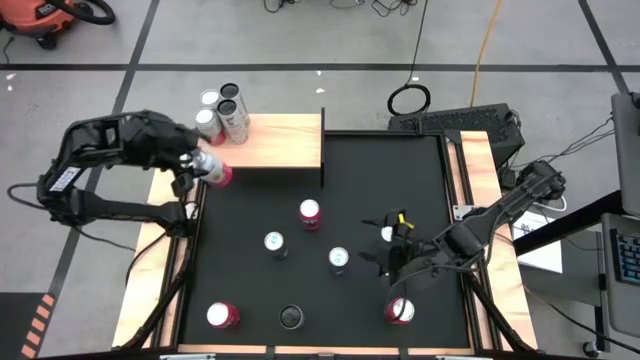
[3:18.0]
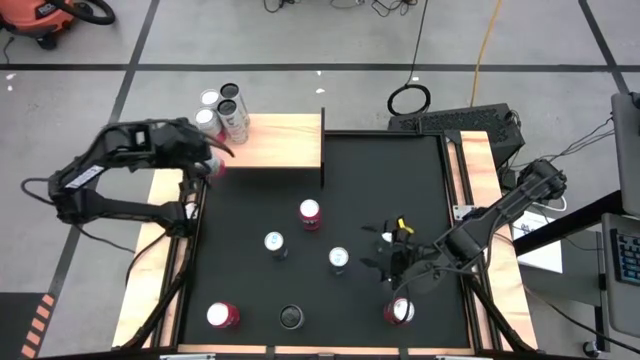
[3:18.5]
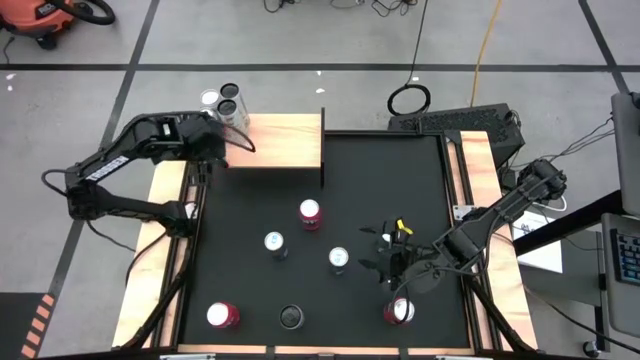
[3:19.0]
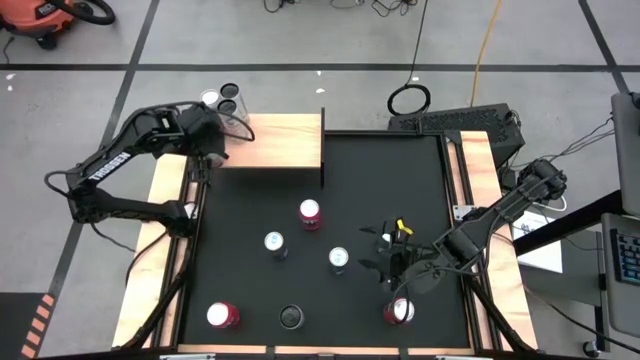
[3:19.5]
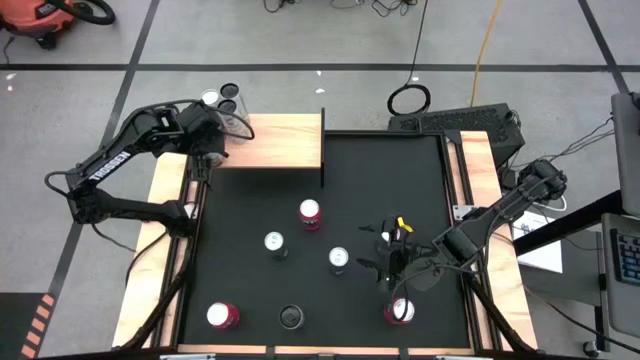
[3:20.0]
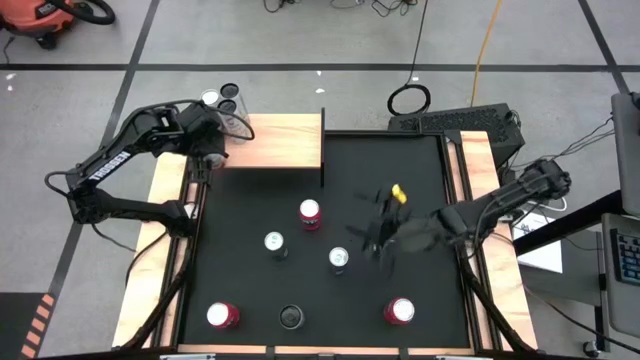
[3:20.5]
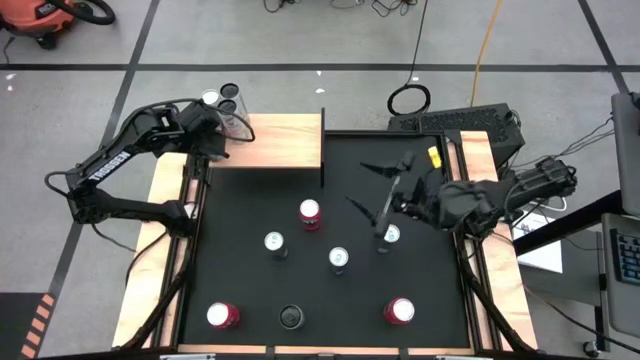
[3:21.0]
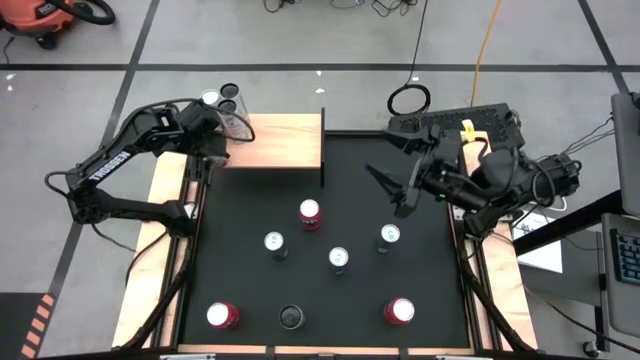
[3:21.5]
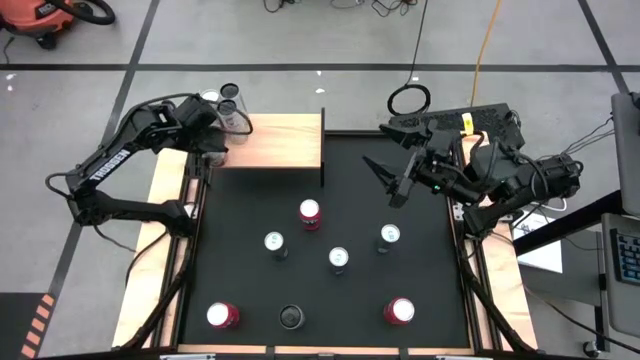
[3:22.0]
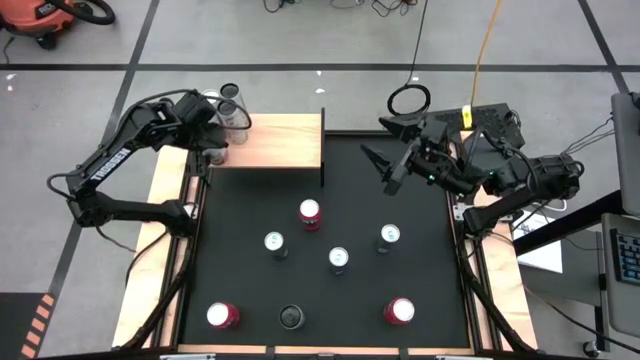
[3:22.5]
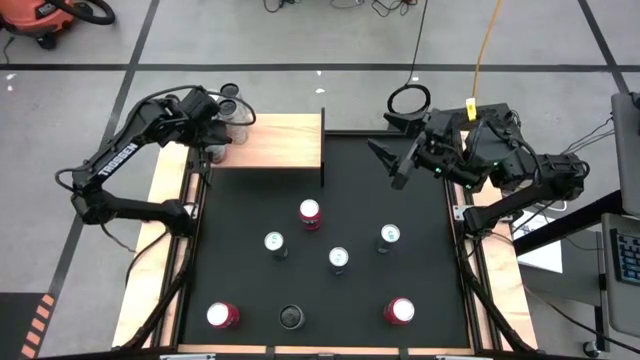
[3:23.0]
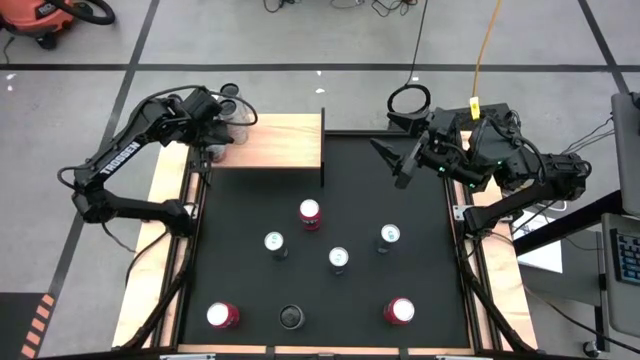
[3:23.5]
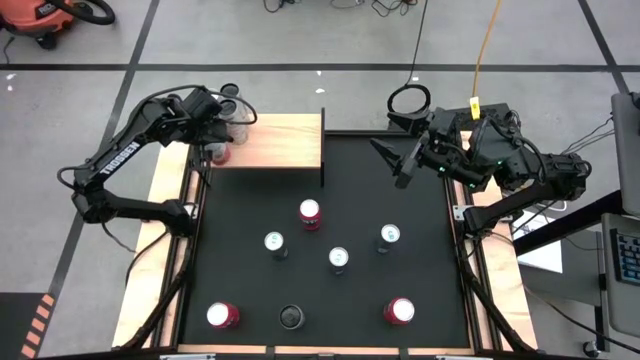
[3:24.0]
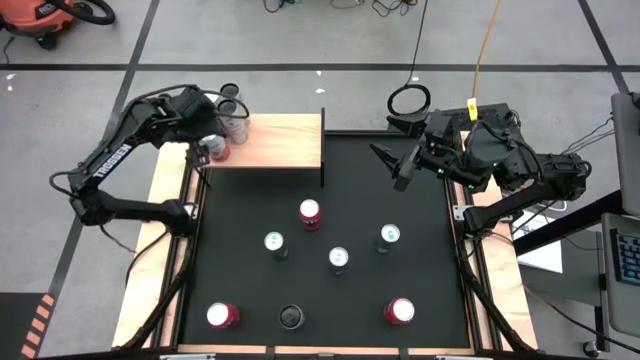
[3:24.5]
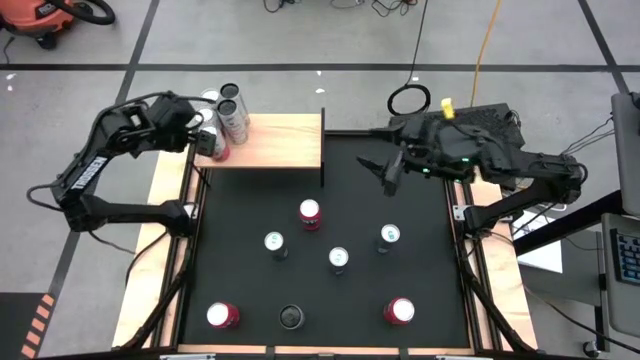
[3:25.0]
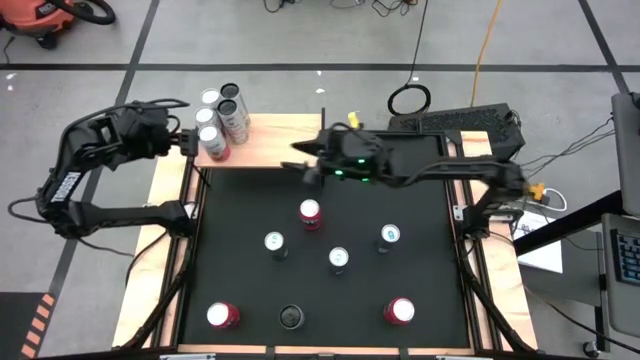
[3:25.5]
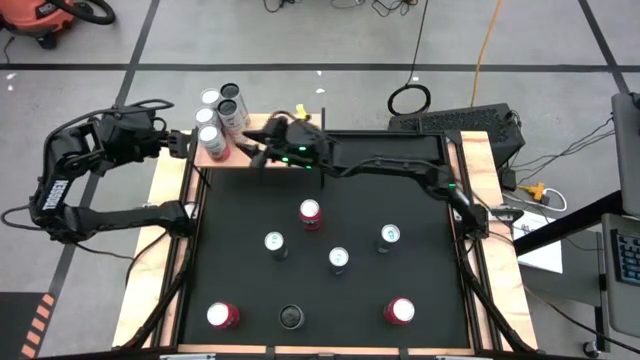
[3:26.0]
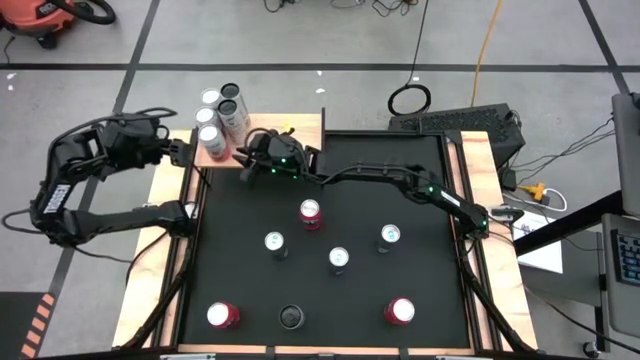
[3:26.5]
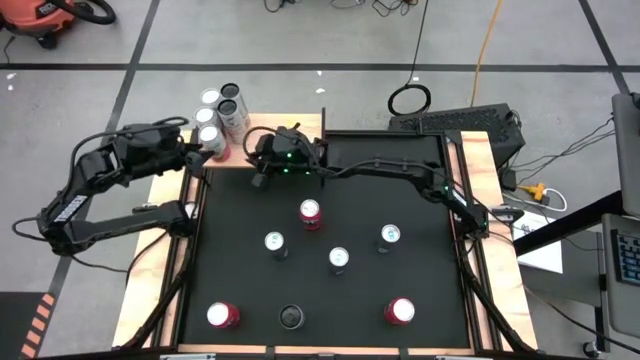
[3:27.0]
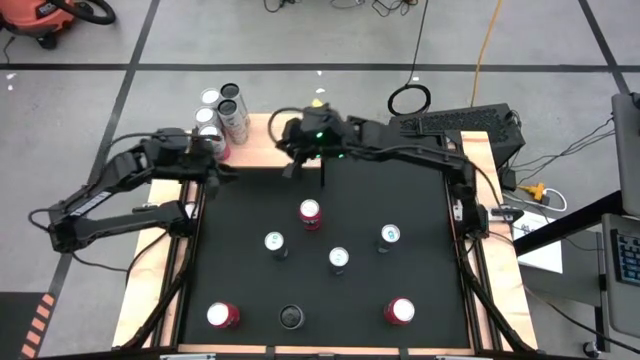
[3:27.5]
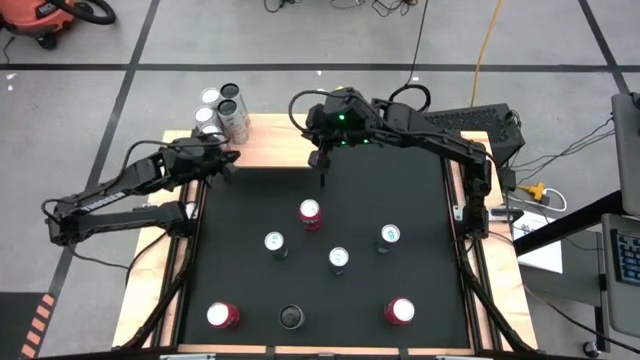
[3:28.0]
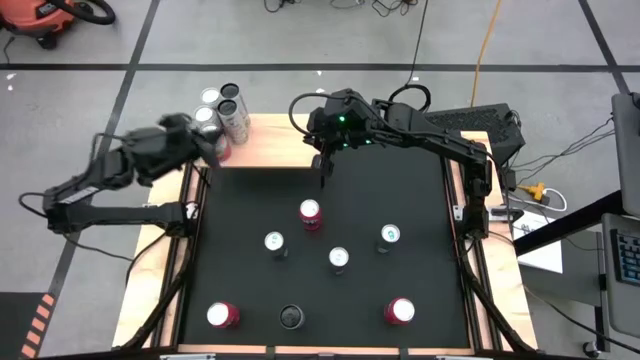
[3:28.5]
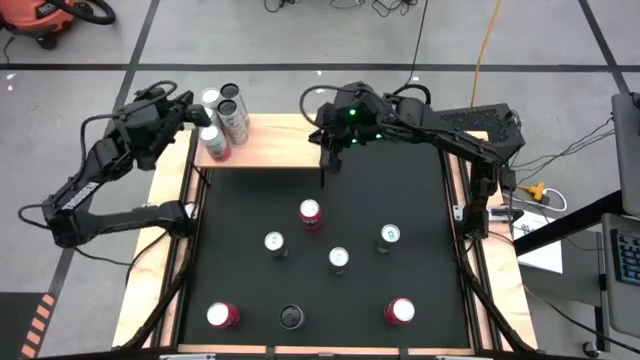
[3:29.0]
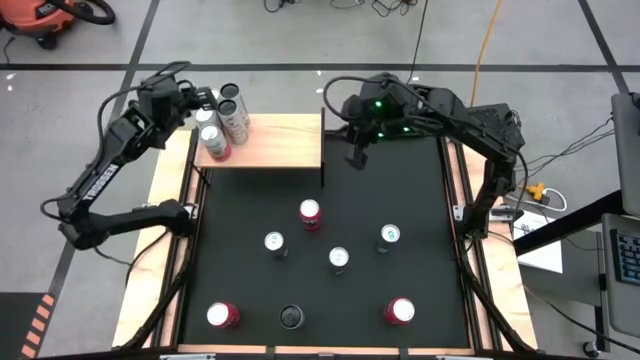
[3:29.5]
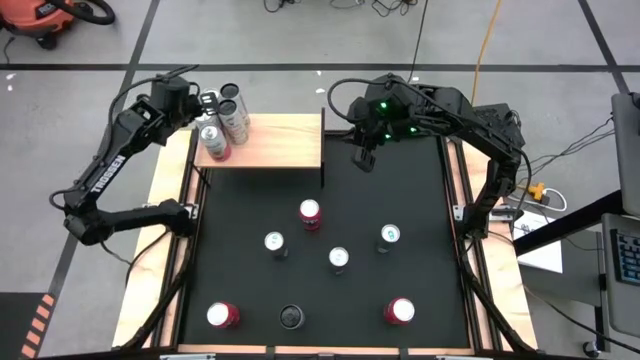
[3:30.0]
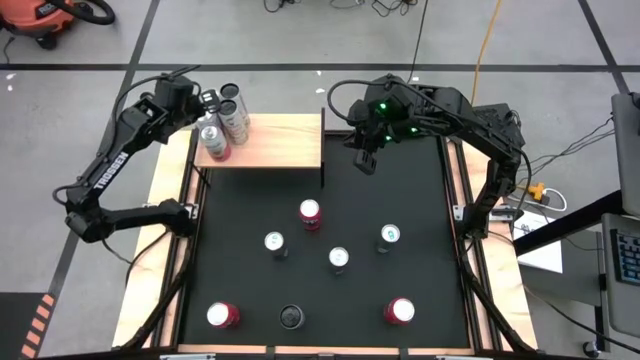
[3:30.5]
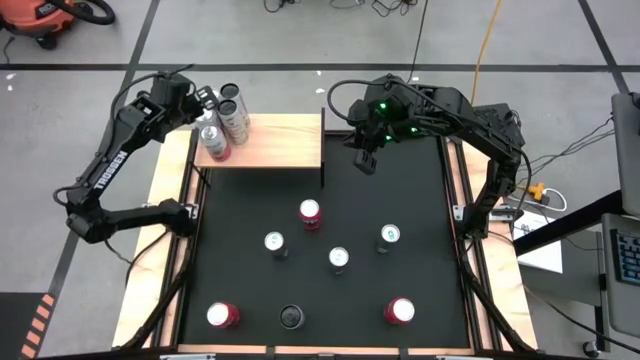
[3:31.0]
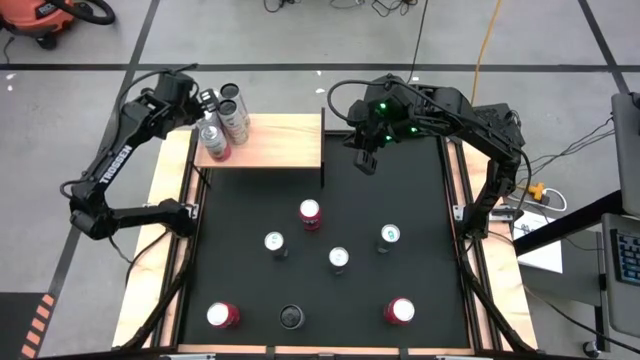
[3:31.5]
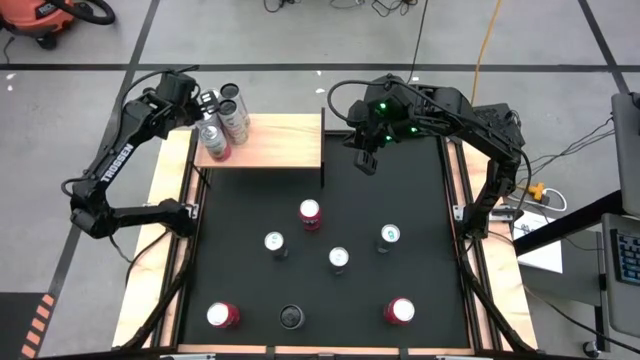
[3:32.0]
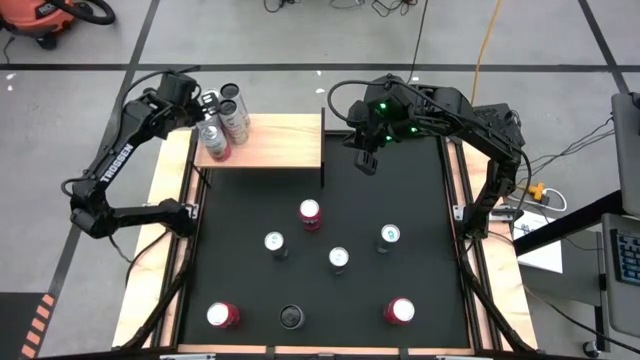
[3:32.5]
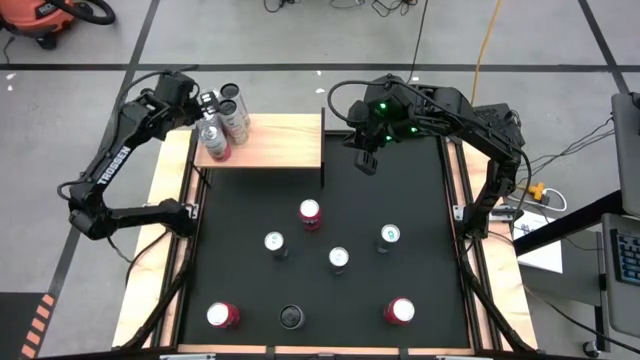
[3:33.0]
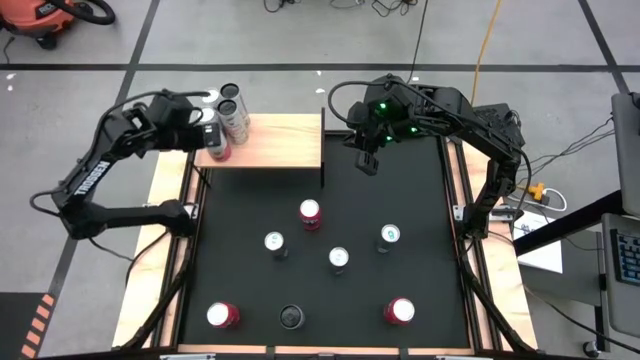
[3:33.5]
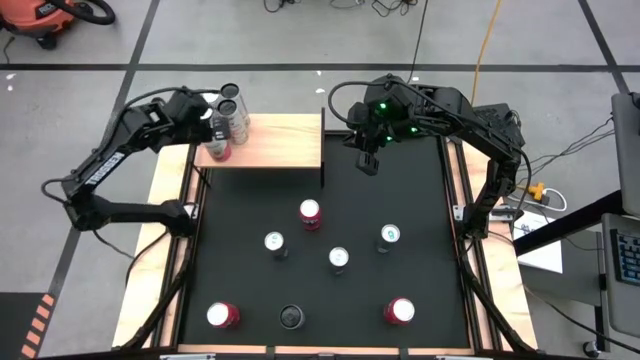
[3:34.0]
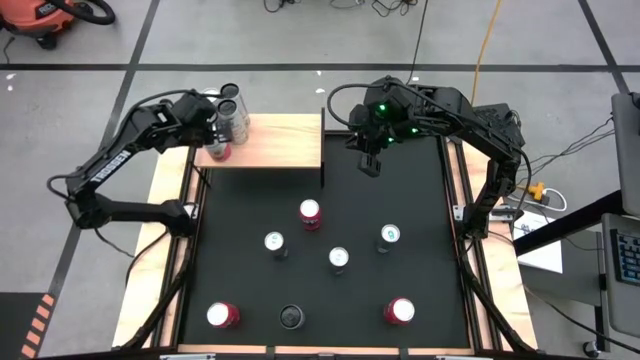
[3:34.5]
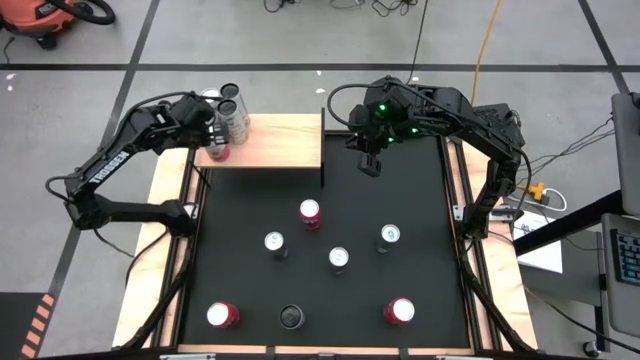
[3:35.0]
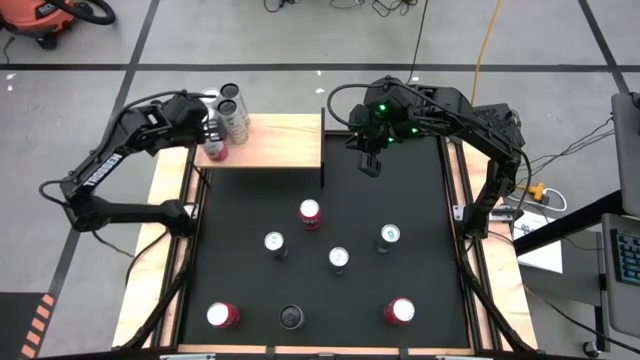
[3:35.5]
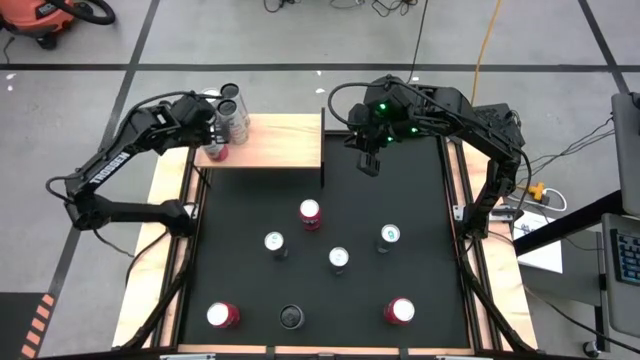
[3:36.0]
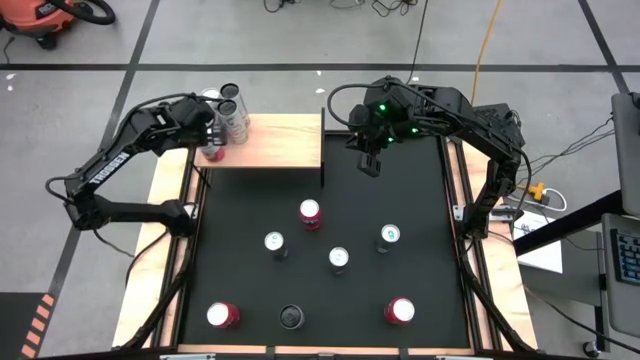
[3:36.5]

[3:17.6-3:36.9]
Task: Place canned beverage on shelf
Put the pink soda can on the shelf aligned with the other pink soda cans

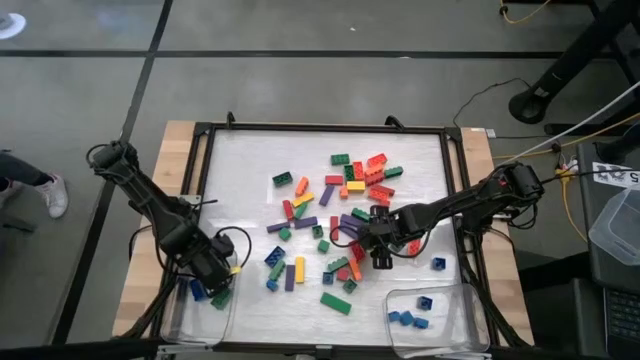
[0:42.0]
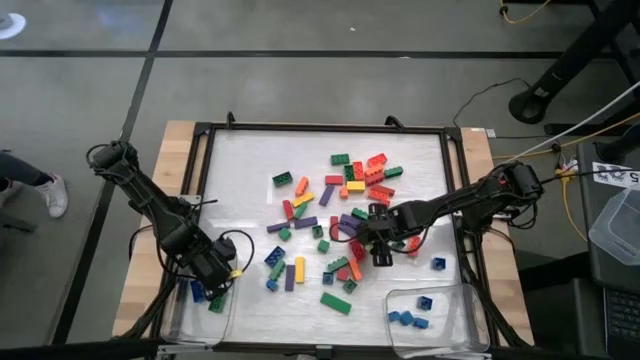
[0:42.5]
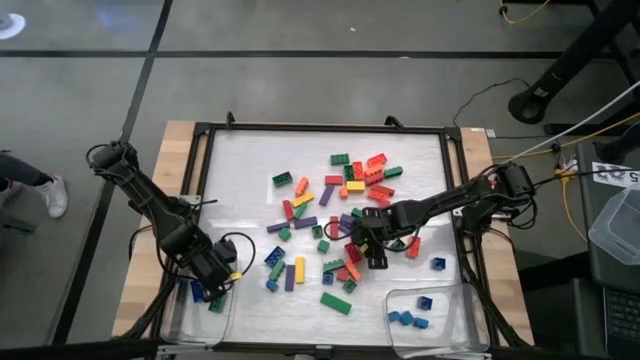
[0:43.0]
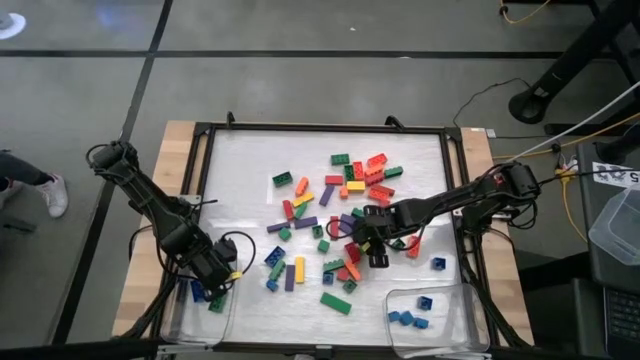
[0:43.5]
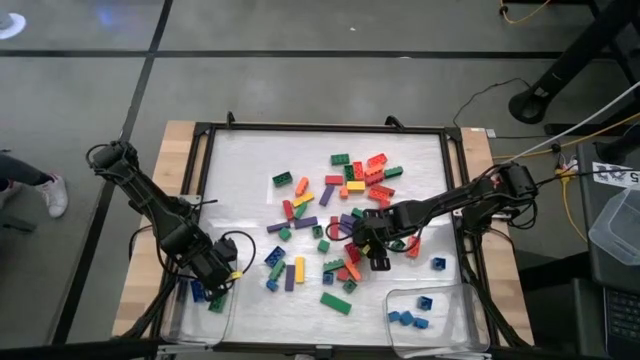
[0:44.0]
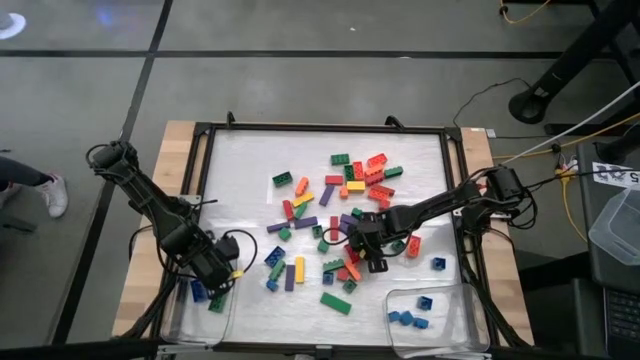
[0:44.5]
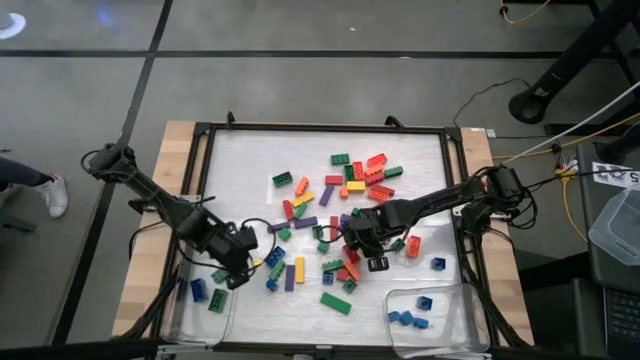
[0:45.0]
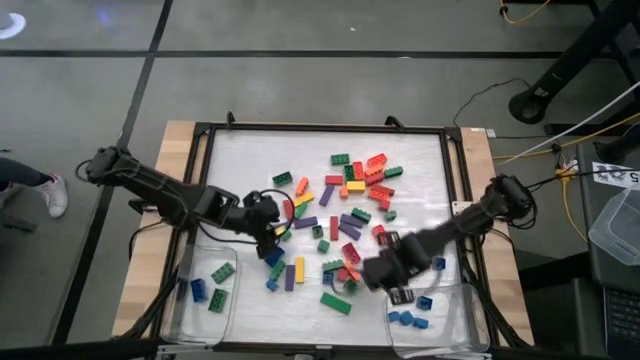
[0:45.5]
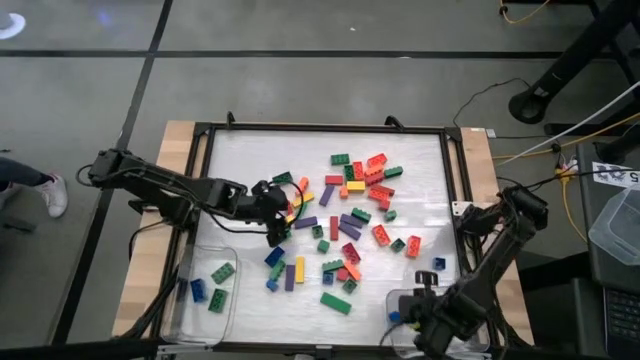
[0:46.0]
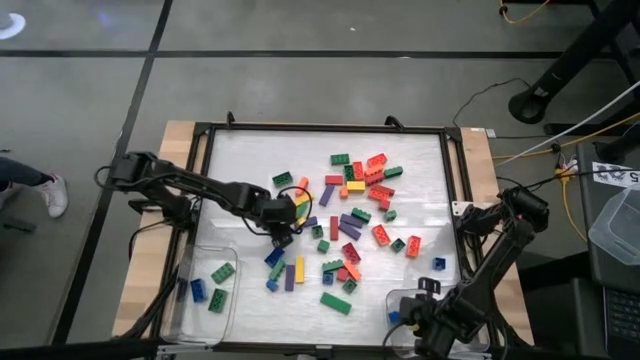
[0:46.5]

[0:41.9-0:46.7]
Task: Sort blocks by size
Put the small green block into the right transparent bin
